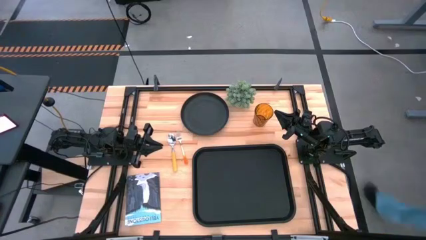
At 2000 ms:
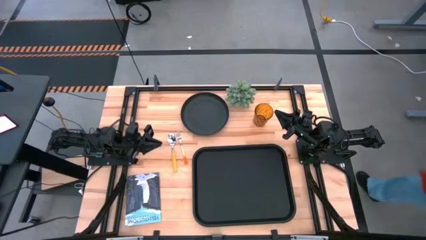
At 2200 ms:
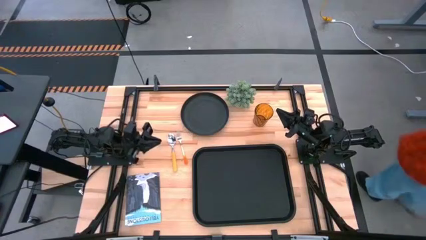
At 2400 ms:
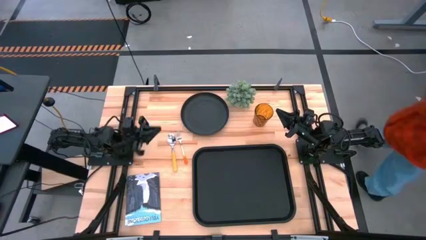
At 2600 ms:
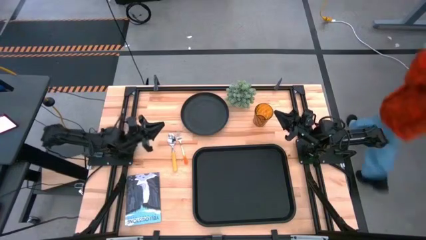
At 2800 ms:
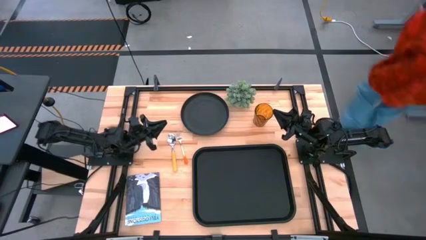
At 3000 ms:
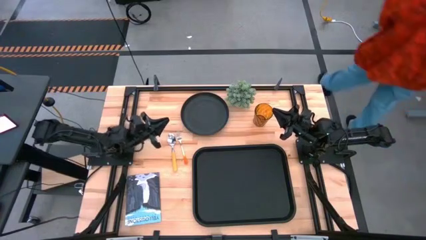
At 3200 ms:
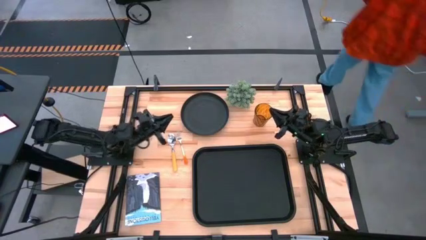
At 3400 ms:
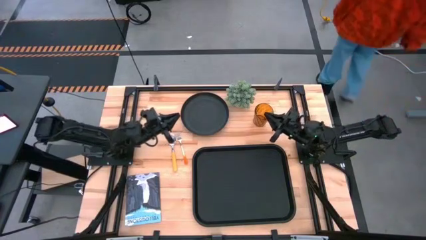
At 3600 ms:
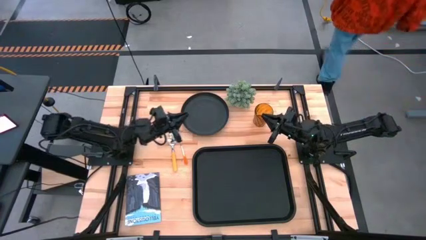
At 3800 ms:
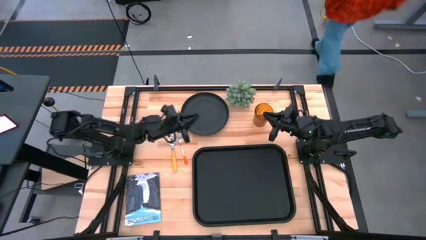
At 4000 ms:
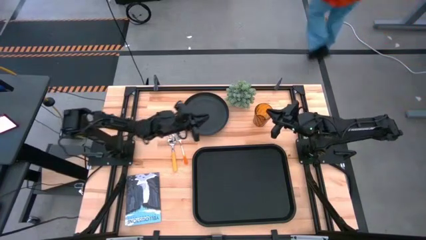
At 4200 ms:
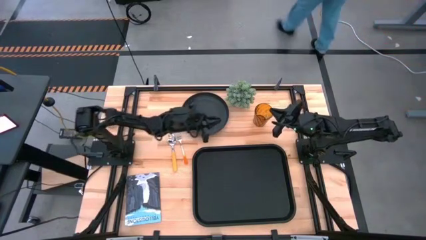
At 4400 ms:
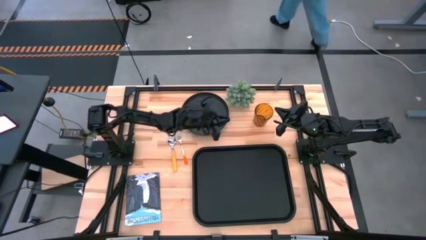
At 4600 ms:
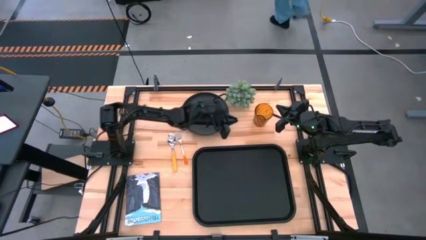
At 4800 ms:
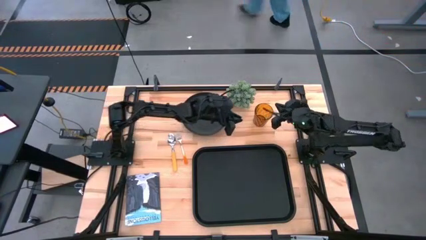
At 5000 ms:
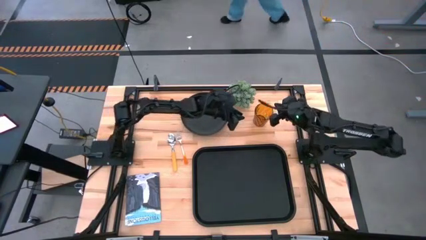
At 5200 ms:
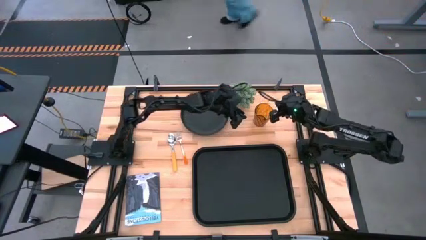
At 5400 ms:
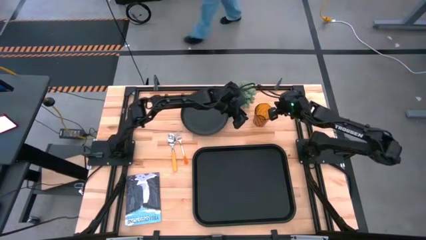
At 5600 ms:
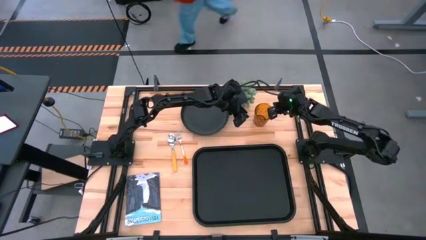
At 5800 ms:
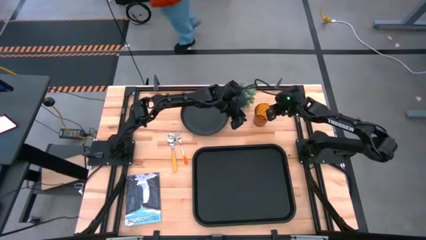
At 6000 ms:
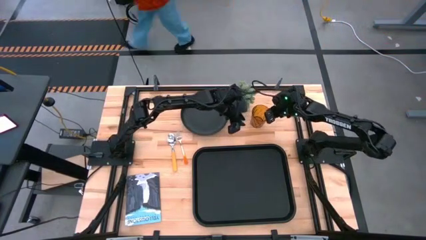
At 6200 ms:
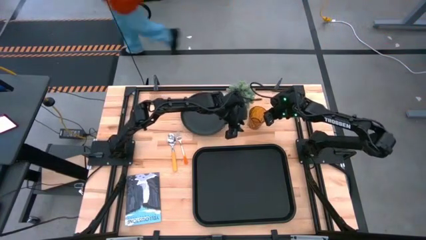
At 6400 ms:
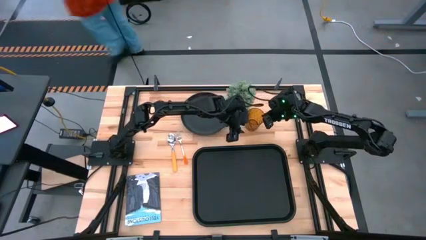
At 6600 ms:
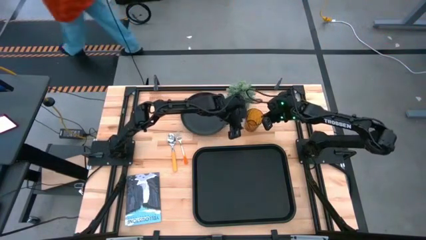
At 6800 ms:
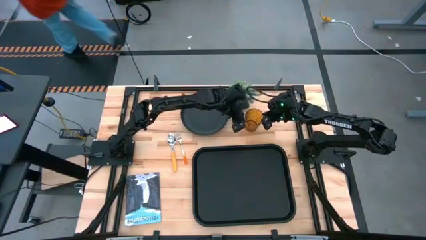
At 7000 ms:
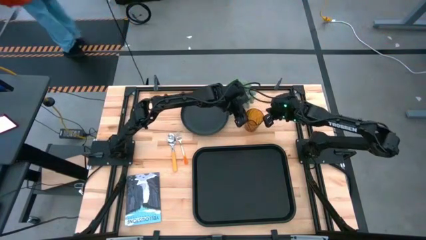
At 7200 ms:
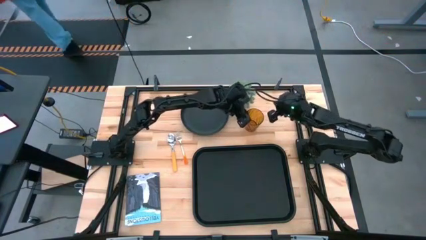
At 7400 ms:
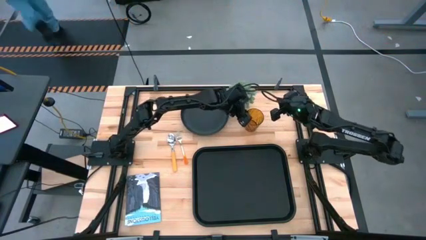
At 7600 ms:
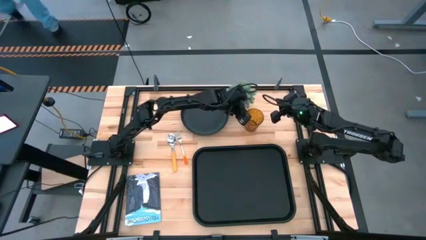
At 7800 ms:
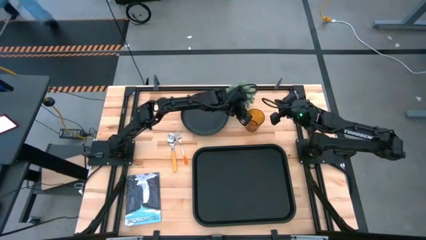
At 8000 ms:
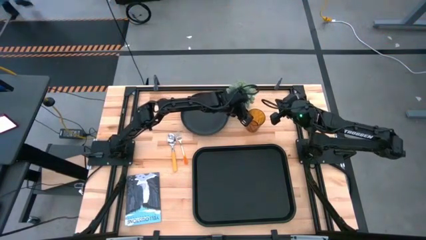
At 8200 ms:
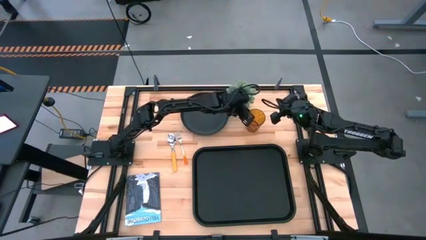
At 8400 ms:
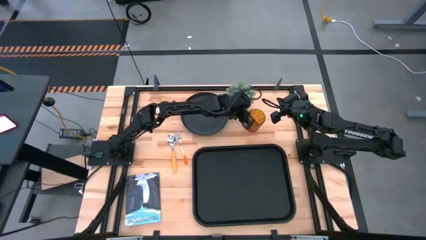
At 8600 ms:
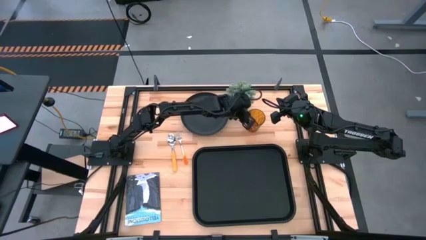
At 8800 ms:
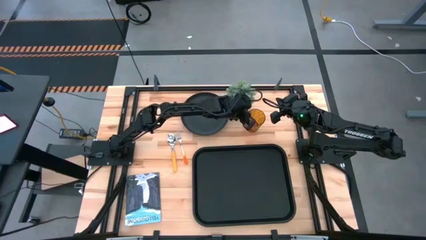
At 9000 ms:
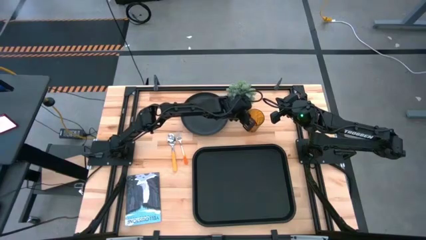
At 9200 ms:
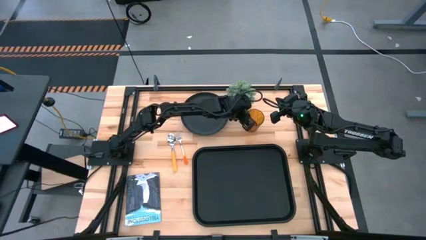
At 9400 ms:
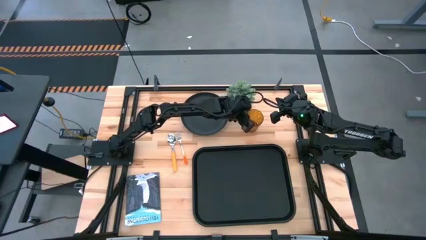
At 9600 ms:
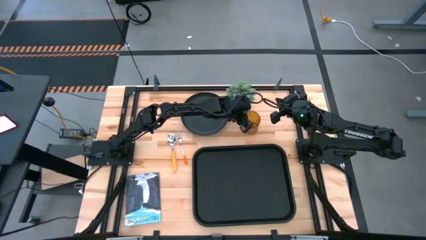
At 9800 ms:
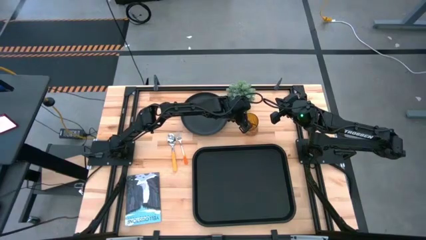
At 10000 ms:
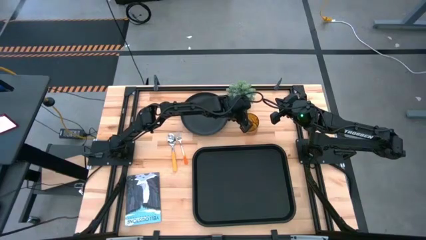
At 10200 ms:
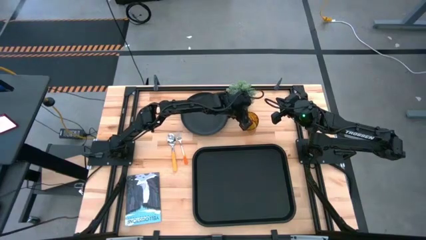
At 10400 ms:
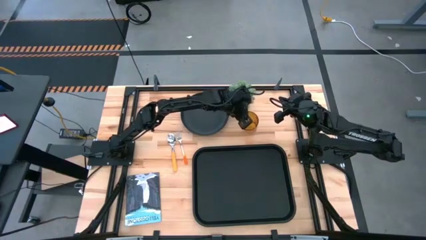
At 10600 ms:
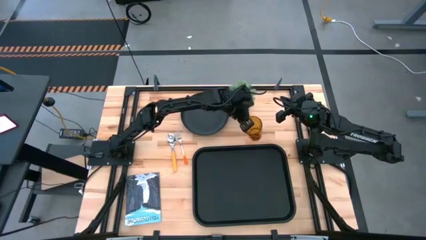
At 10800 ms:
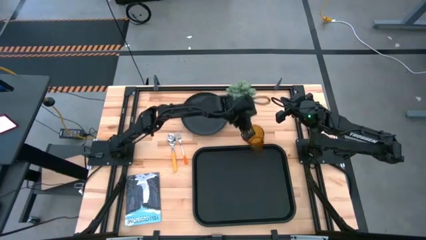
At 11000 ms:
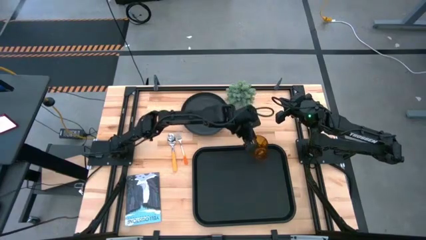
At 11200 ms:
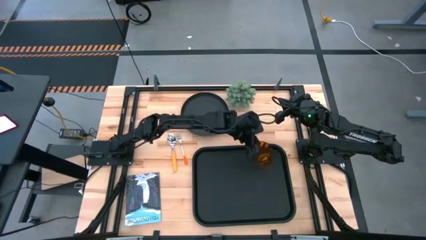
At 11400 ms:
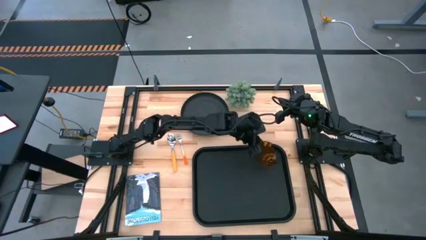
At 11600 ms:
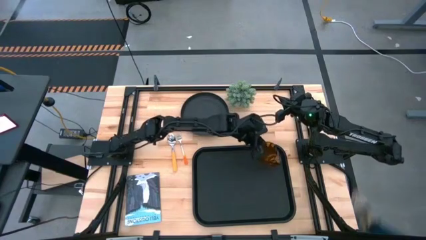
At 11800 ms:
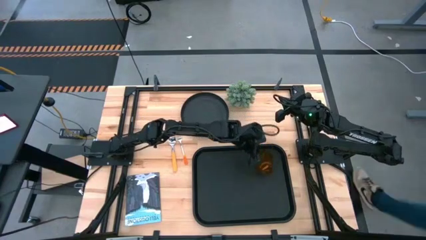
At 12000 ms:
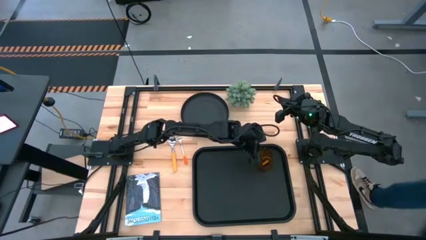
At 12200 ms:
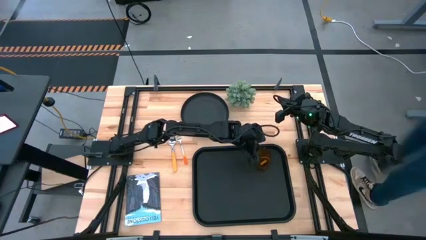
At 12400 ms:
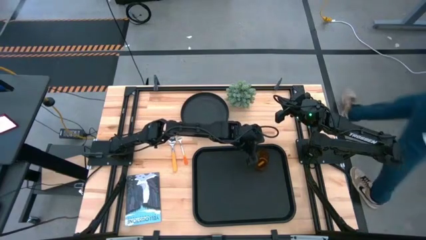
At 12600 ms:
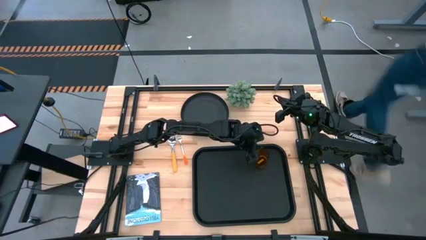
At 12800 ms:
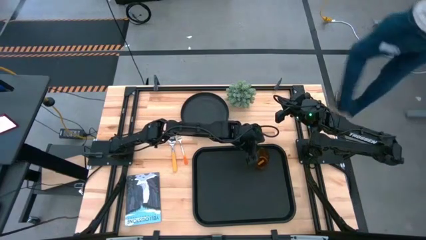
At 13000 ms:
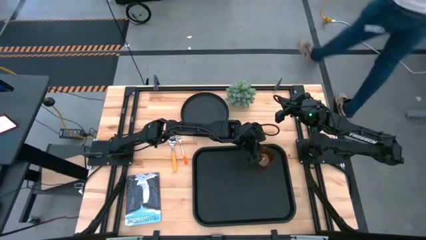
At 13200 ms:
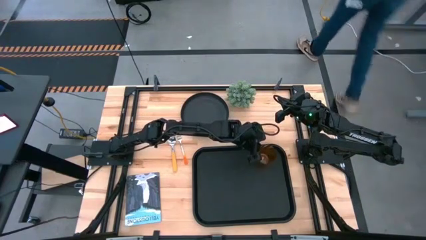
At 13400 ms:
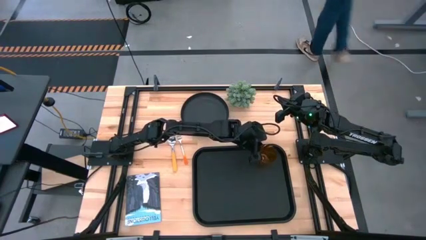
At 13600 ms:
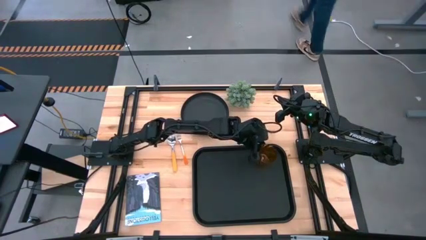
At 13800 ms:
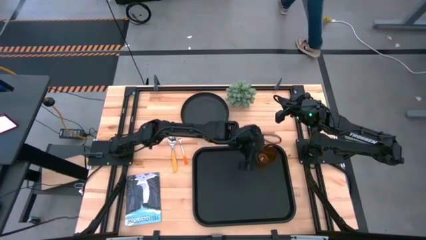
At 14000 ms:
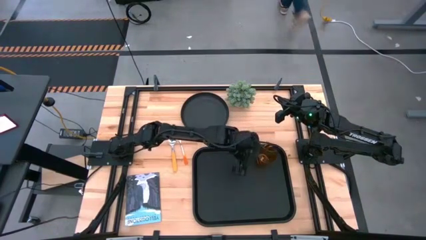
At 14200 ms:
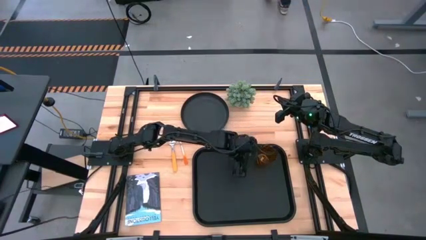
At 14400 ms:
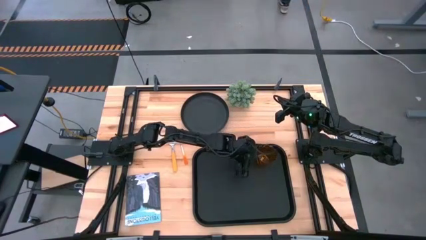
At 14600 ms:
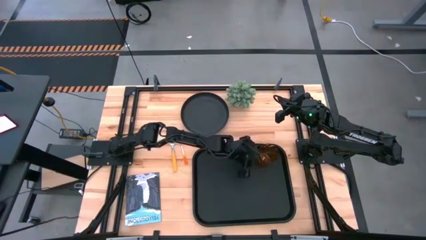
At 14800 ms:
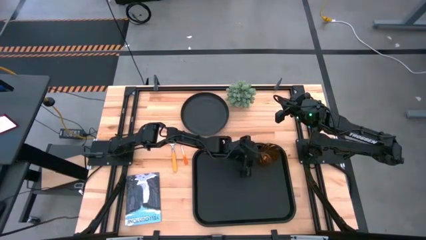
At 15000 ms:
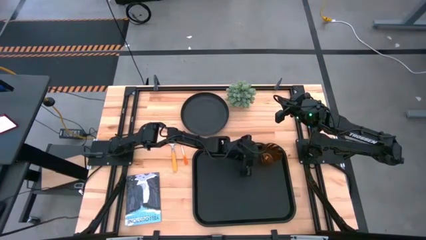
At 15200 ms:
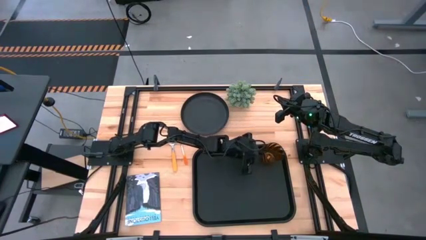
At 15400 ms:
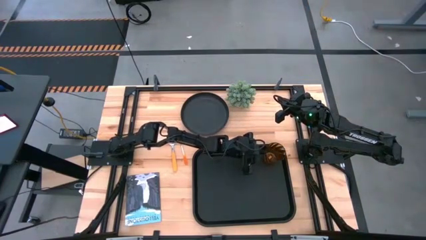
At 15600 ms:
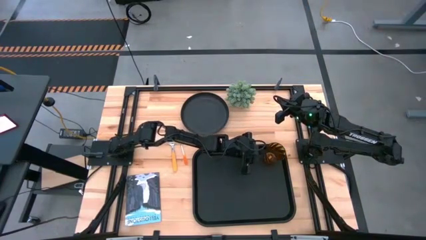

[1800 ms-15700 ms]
Task: Pick and place plate/cup/fork/spoon on tray
Put the brown cup on the black serving tray
